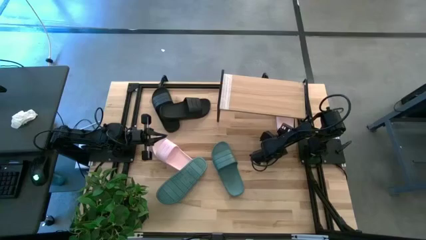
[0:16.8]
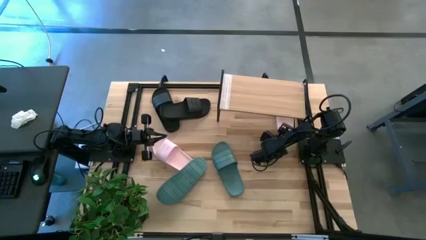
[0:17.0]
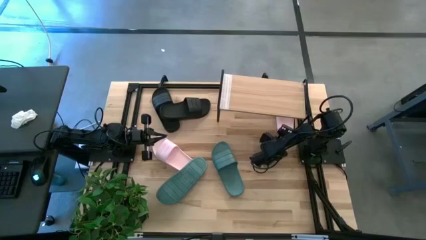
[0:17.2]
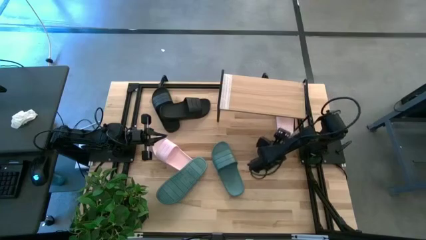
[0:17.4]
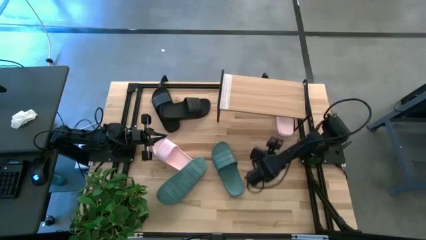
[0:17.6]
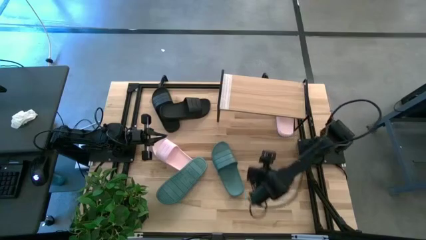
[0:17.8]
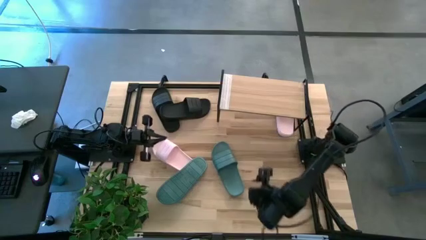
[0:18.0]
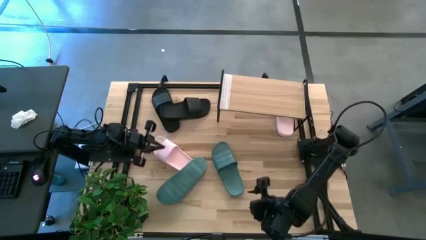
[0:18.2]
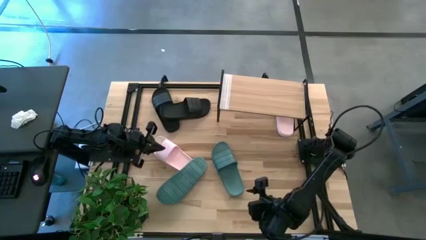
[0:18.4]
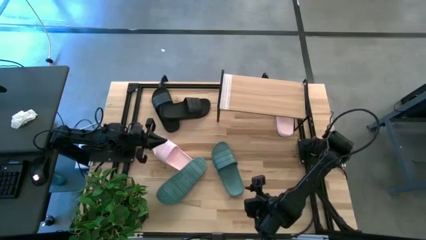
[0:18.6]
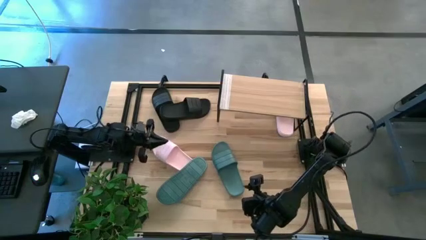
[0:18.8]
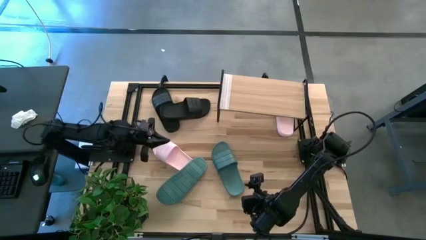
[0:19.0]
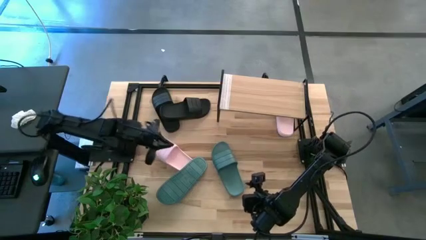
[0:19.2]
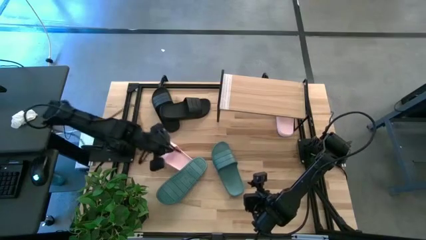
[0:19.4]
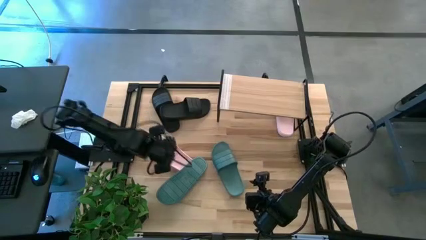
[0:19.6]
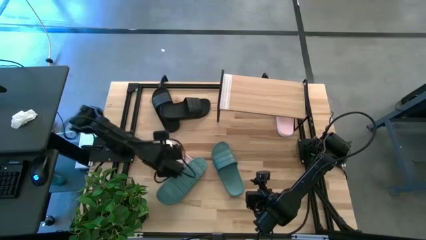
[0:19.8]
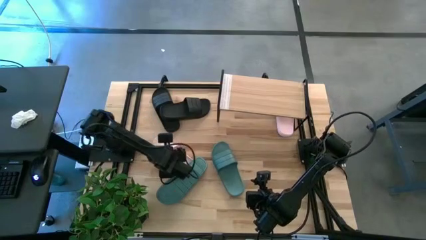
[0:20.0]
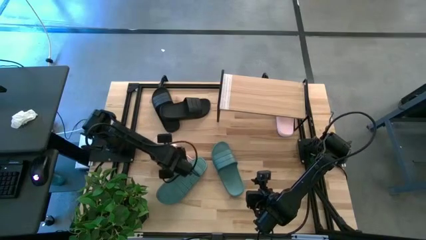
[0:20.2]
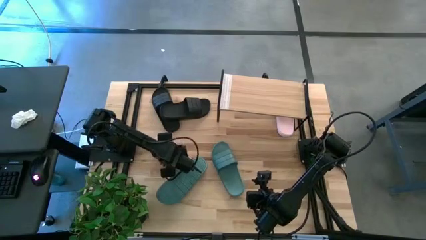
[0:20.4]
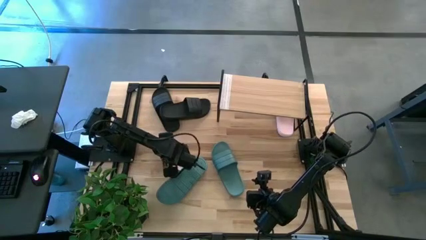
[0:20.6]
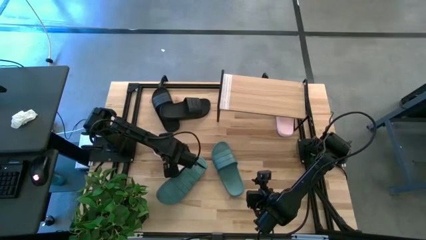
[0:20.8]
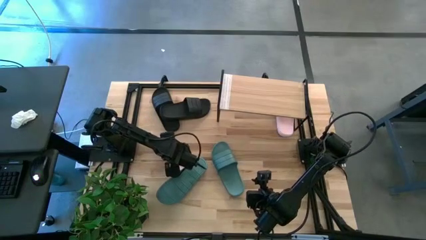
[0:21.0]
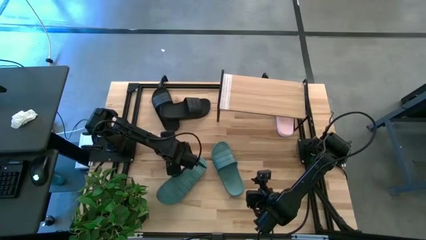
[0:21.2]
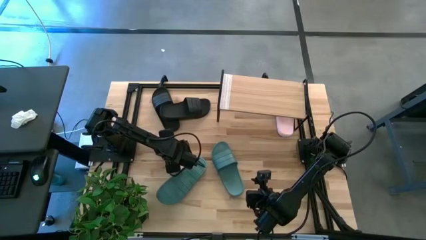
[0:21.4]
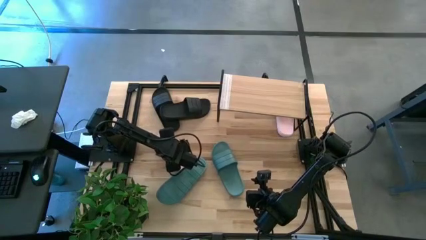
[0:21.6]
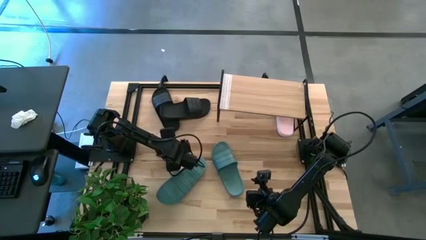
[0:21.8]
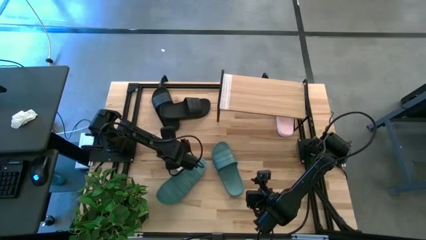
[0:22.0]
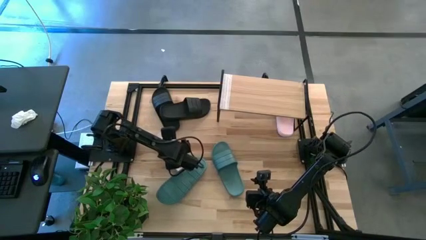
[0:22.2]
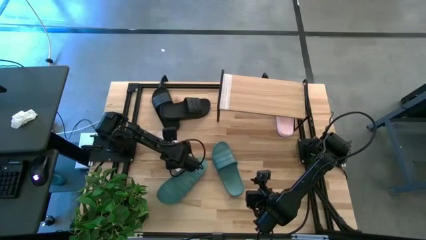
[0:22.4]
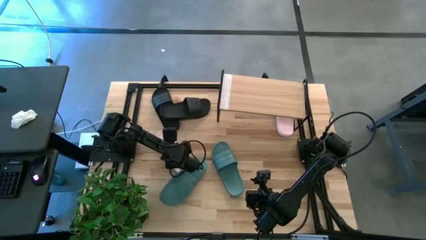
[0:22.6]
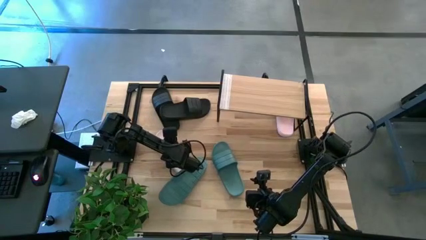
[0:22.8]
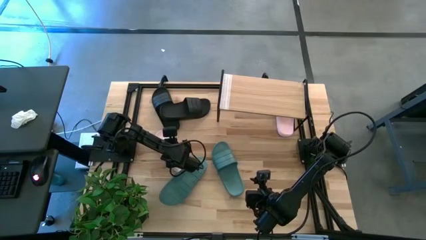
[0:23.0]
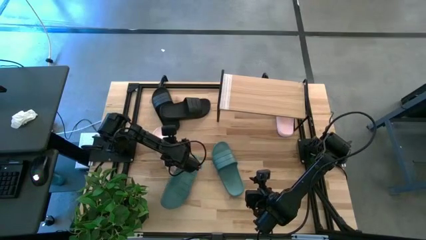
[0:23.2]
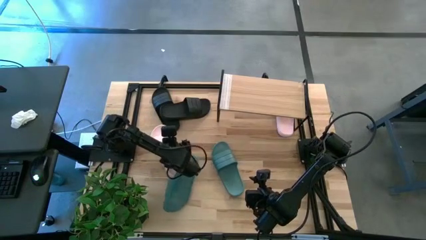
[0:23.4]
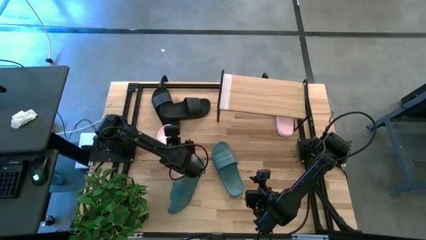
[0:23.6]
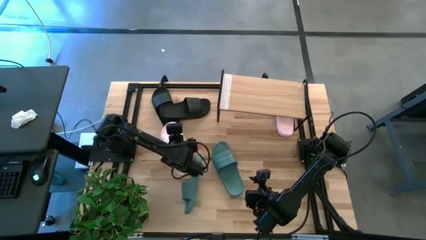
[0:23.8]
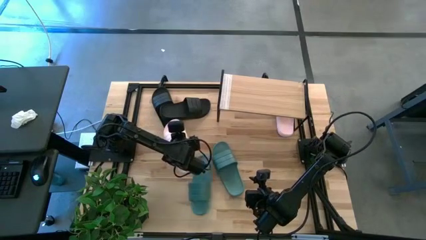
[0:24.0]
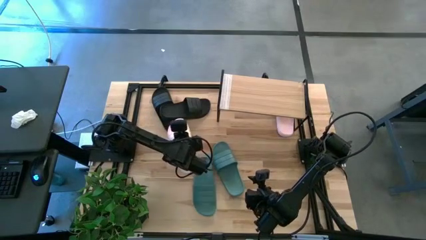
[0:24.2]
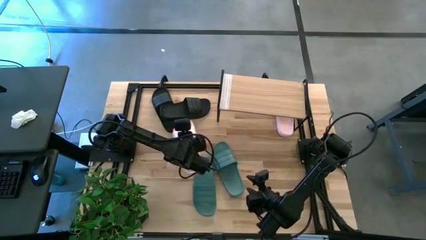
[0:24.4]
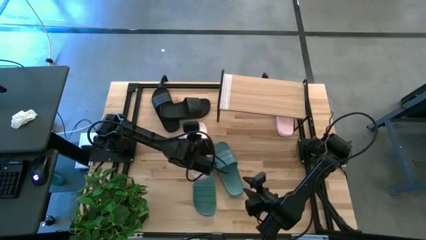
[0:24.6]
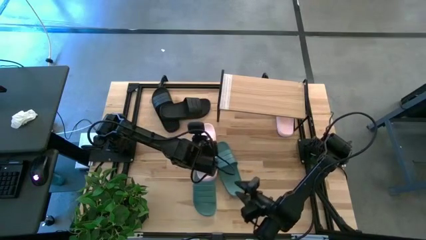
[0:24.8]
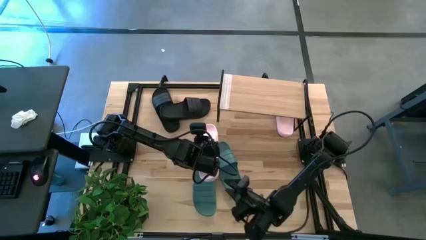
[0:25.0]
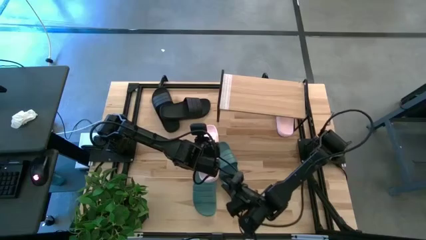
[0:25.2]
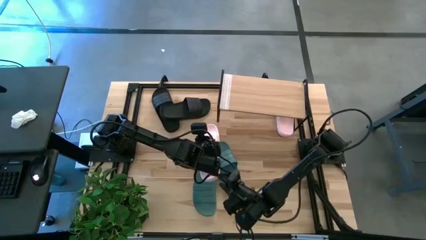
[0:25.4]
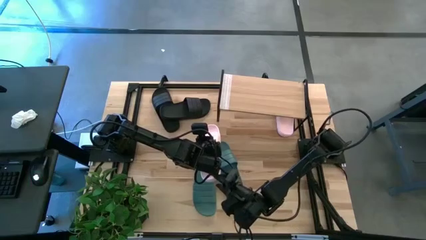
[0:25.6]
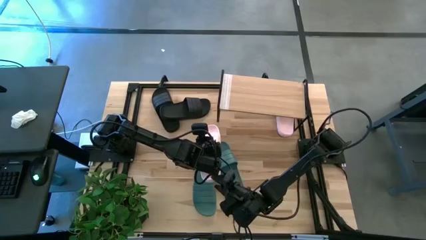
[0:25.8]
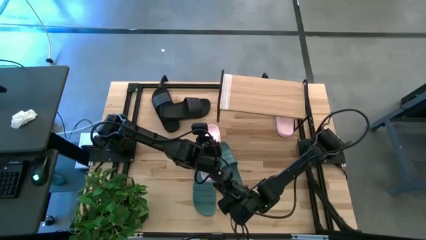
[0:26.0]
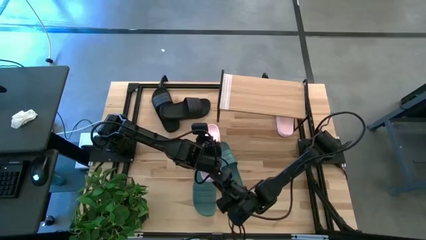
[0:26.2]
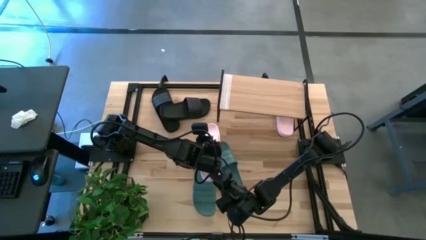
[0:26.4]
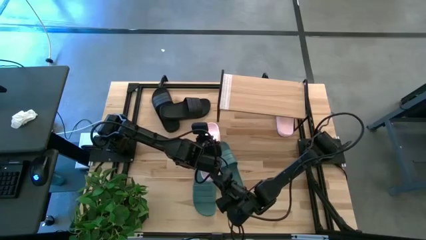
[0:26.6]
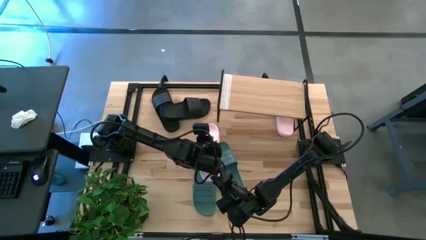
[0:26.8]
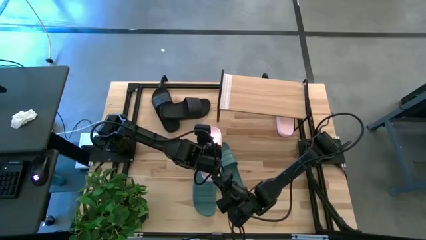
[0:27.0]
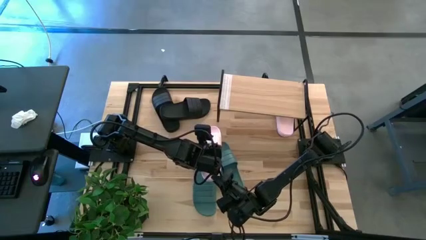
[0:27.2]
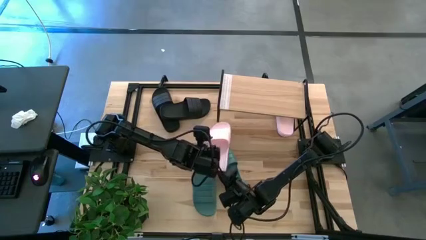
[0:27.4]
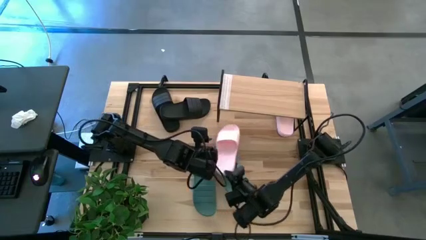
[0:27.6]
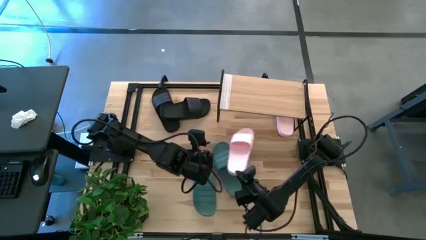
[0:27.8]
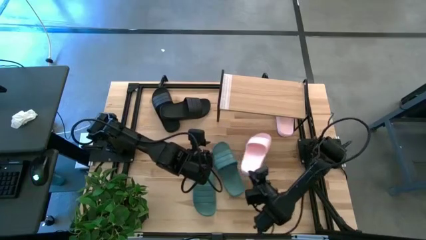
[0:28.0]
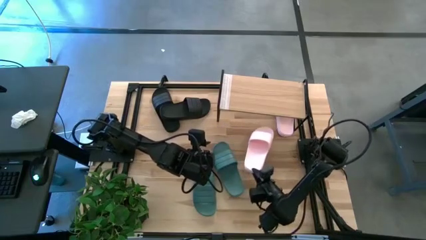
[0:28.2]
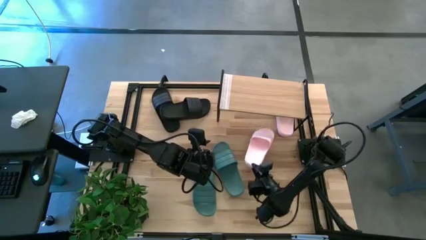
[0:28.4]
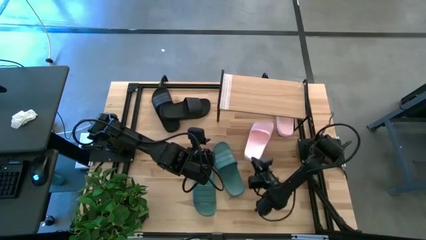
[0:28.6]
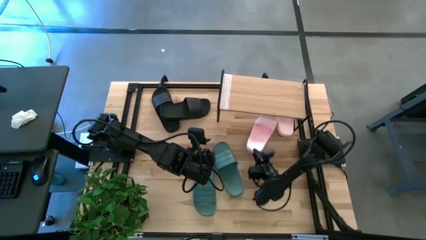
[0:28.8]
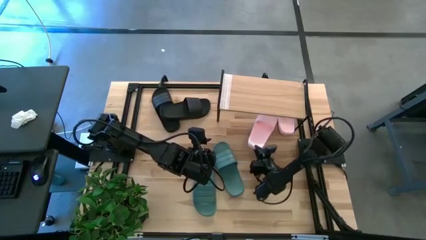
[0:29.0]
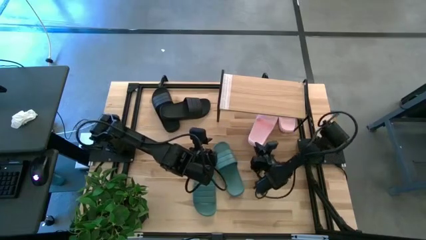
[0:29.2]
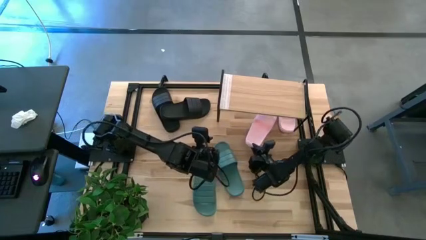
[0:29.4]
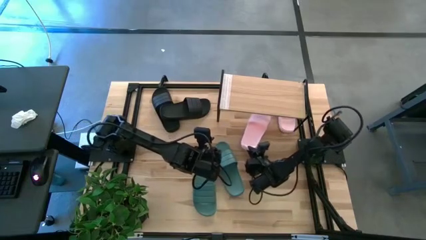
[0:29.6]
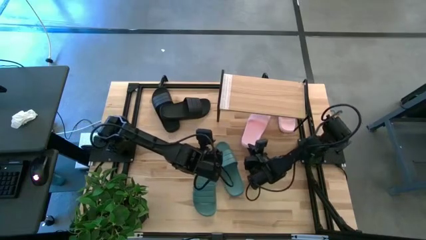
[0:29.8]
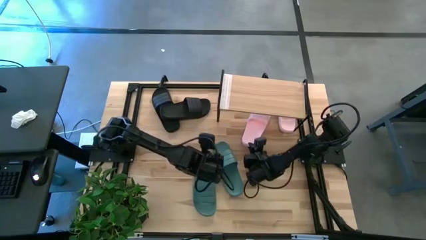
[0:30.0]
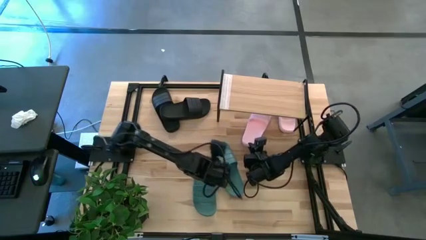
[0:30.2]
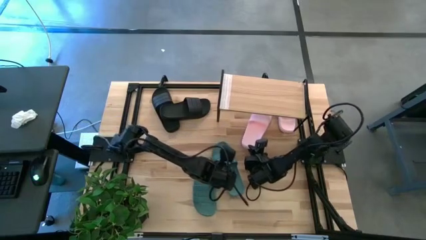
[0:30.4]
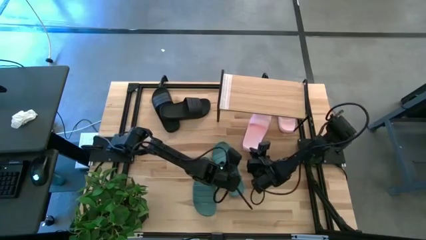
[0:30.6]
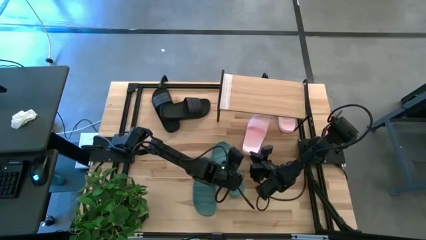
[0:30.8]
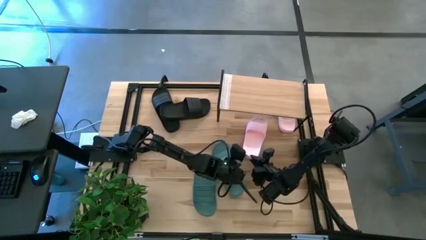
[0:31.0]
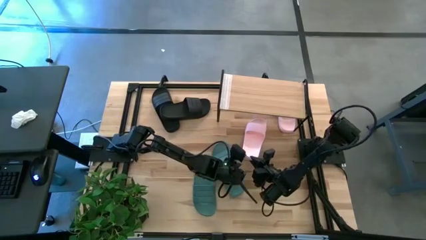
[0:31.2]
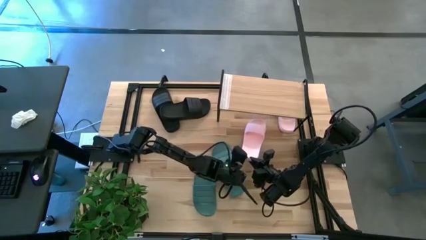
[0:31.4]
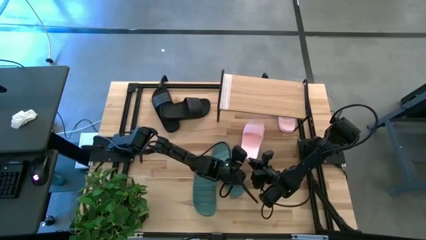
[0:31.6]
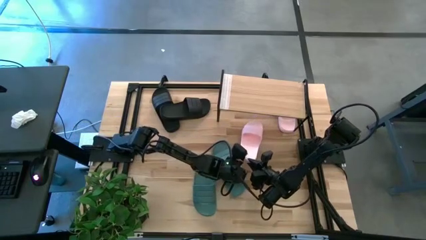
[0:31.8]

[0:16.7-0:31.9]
Task: Pick and place slides into the shelf
Put the left pink slides under the shelf
